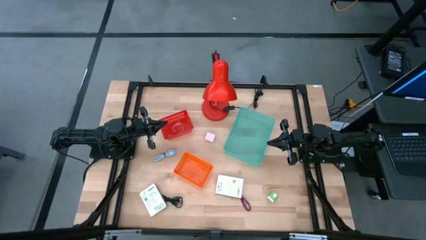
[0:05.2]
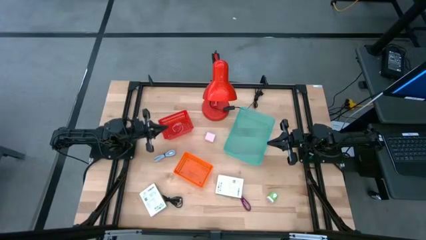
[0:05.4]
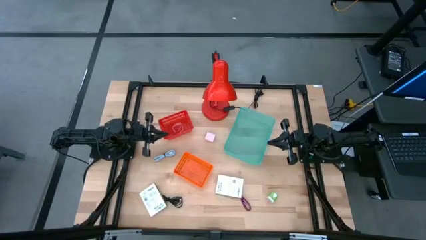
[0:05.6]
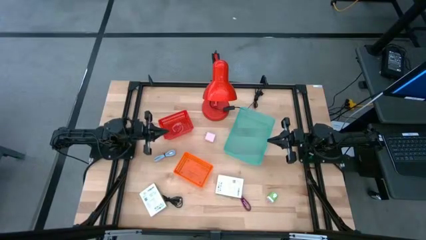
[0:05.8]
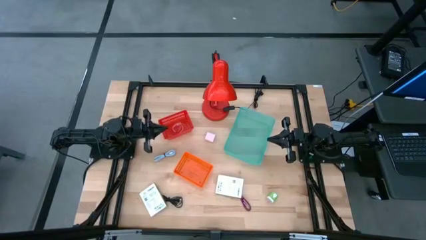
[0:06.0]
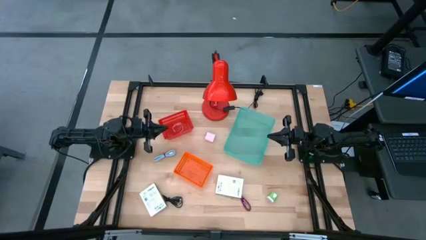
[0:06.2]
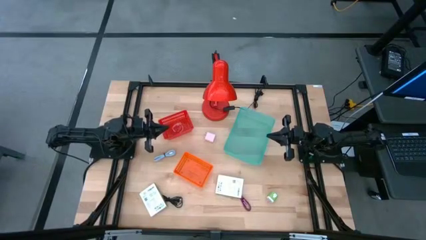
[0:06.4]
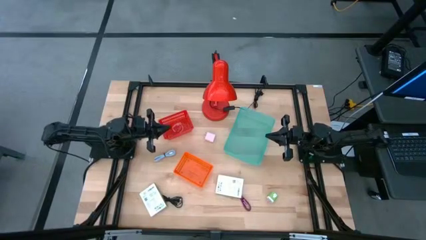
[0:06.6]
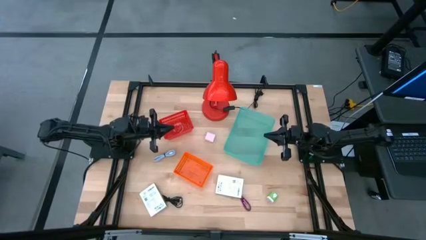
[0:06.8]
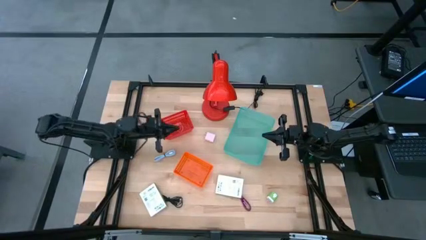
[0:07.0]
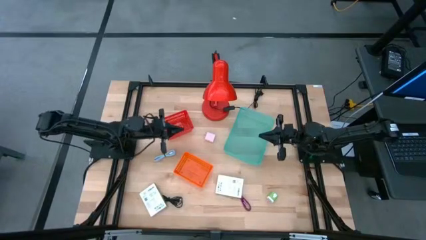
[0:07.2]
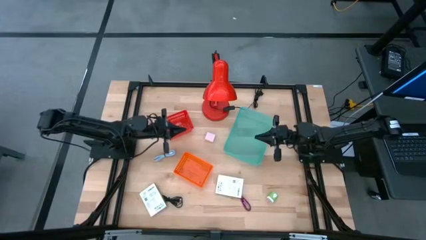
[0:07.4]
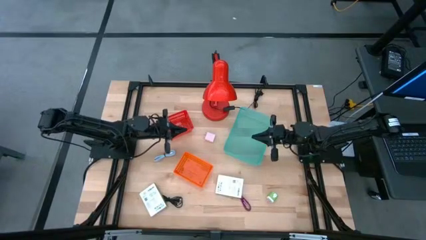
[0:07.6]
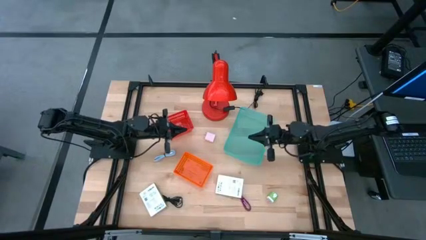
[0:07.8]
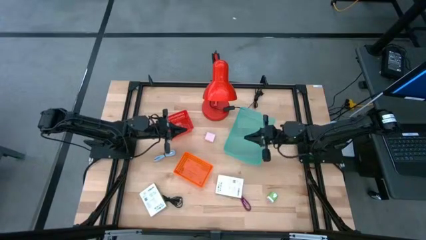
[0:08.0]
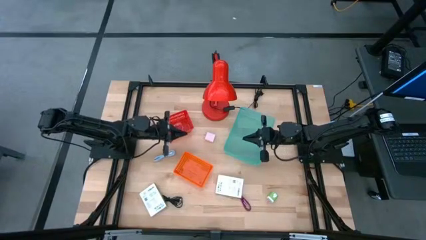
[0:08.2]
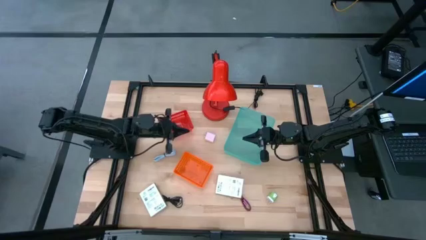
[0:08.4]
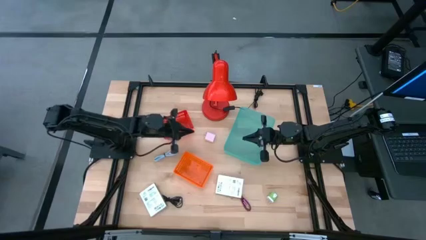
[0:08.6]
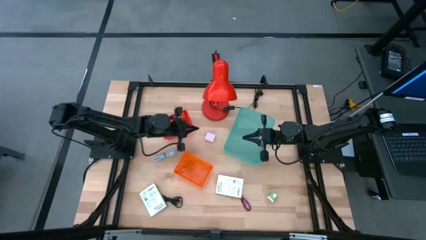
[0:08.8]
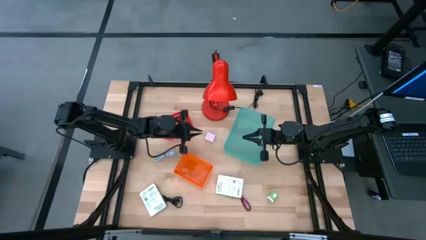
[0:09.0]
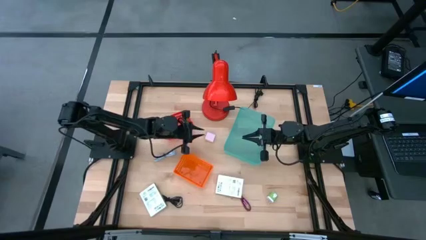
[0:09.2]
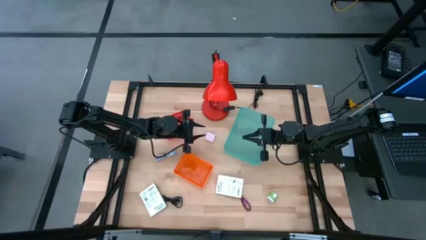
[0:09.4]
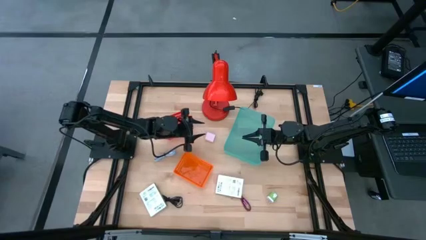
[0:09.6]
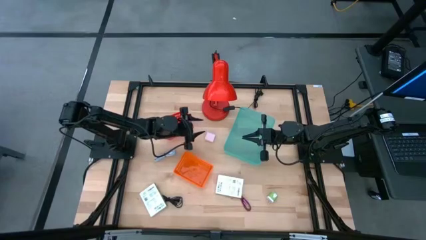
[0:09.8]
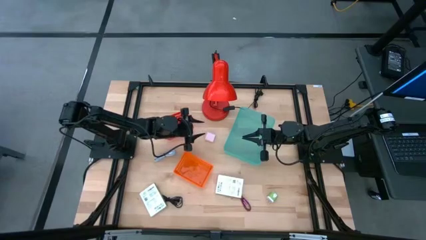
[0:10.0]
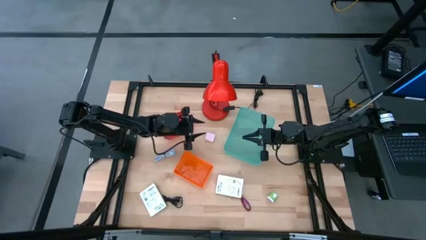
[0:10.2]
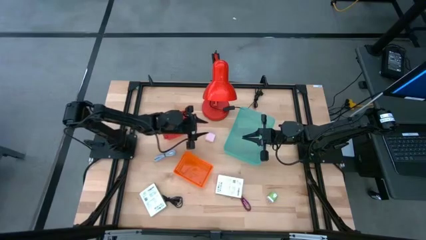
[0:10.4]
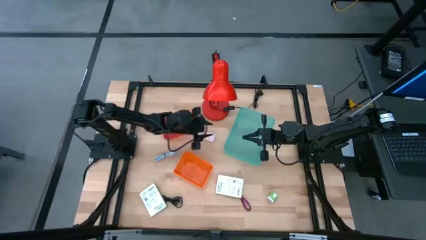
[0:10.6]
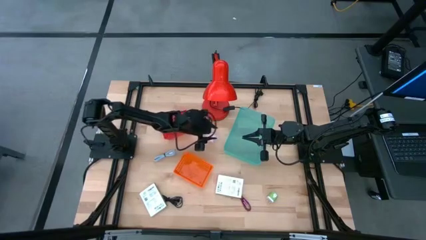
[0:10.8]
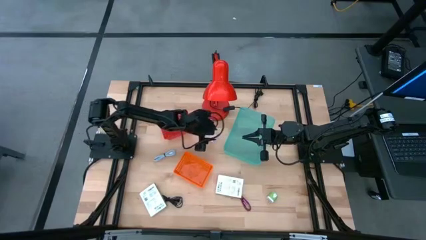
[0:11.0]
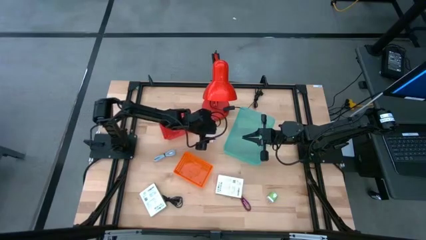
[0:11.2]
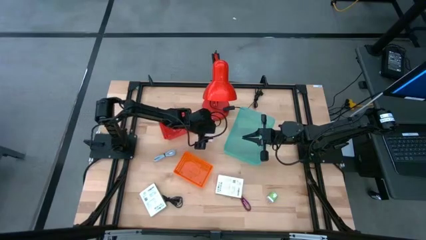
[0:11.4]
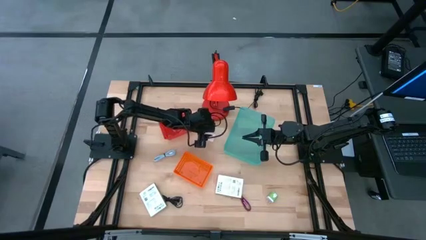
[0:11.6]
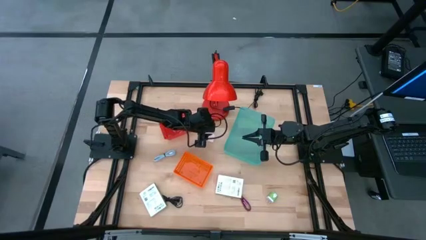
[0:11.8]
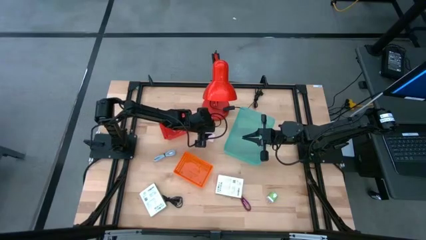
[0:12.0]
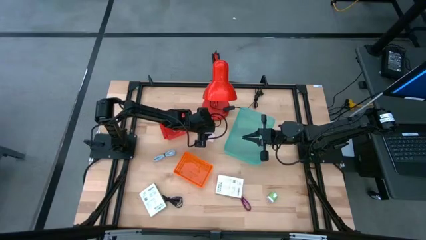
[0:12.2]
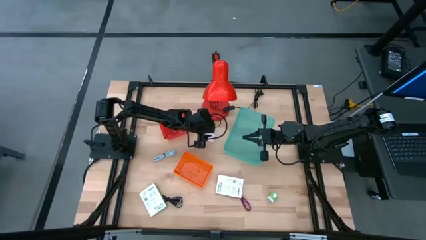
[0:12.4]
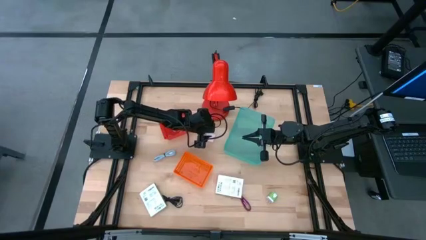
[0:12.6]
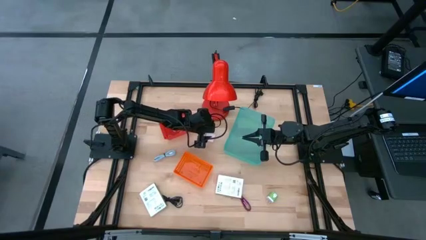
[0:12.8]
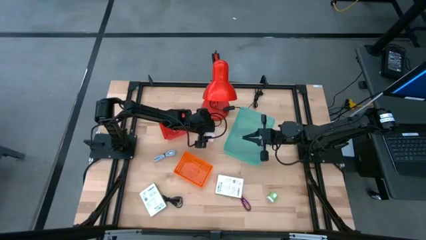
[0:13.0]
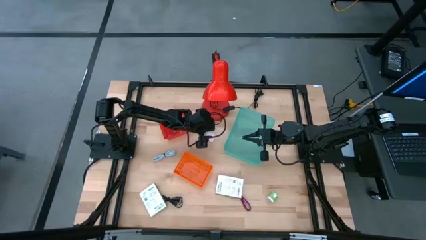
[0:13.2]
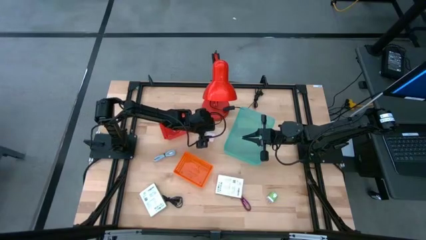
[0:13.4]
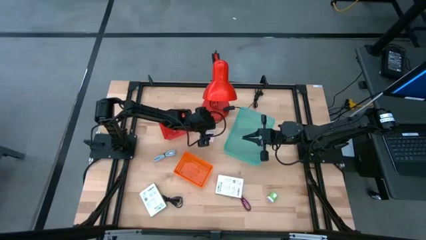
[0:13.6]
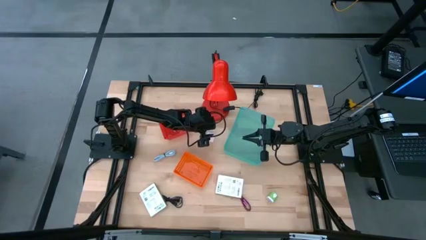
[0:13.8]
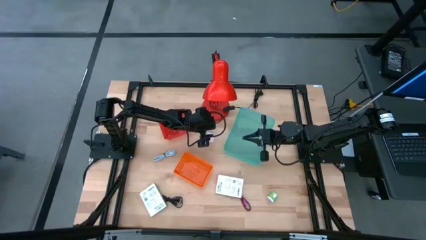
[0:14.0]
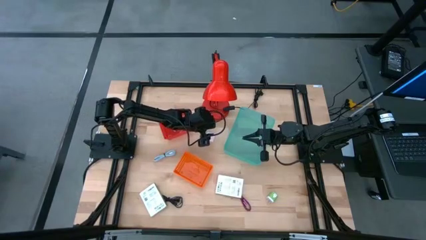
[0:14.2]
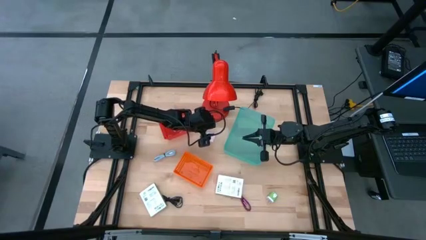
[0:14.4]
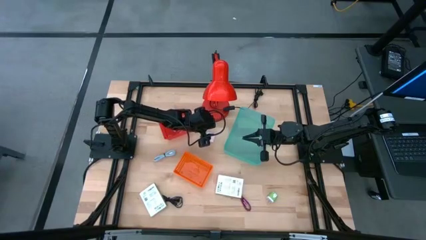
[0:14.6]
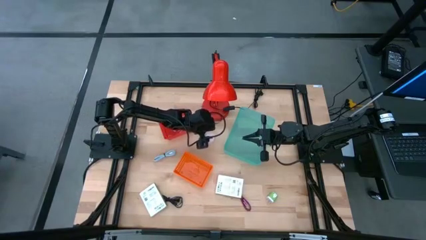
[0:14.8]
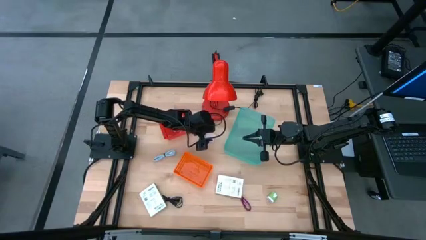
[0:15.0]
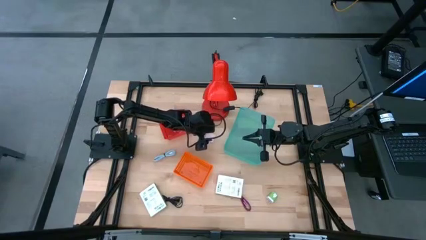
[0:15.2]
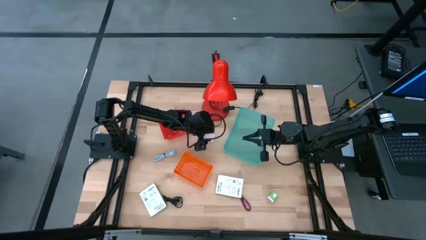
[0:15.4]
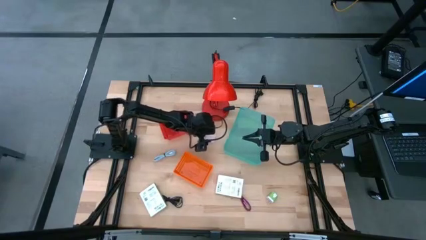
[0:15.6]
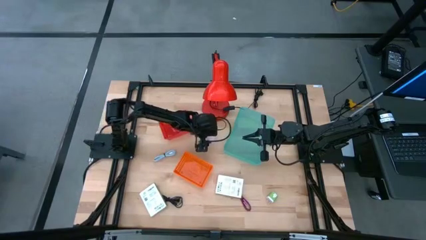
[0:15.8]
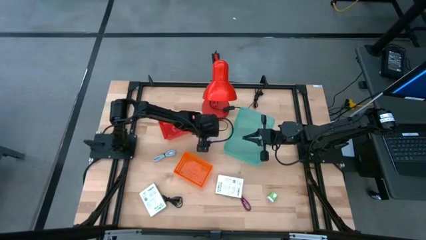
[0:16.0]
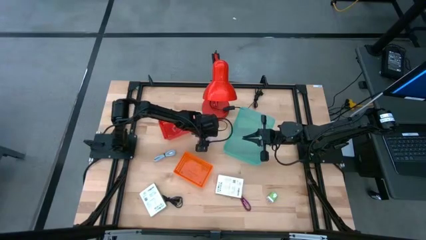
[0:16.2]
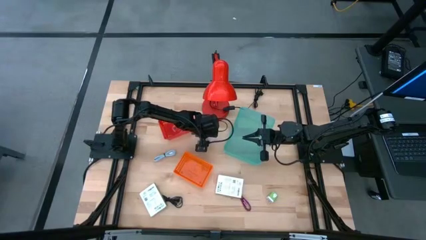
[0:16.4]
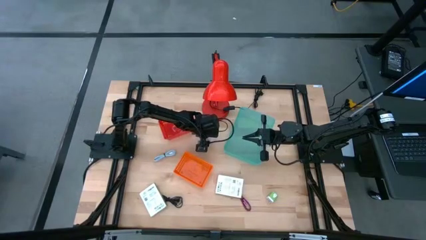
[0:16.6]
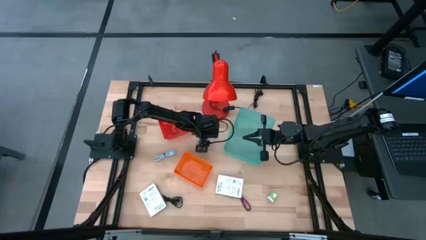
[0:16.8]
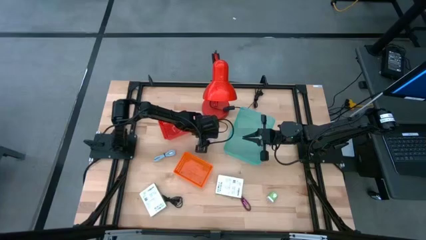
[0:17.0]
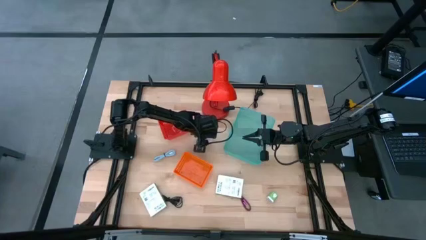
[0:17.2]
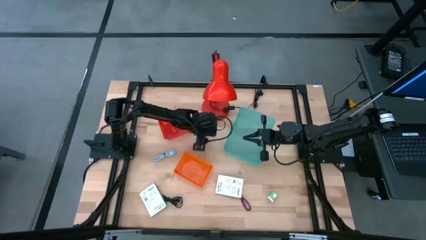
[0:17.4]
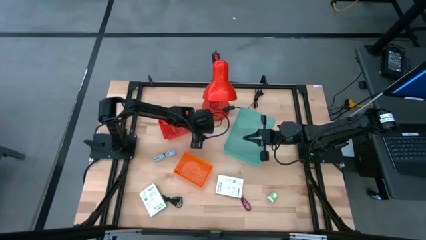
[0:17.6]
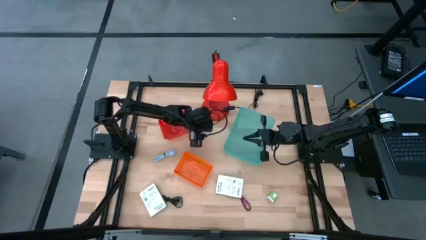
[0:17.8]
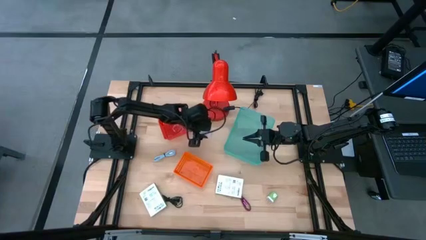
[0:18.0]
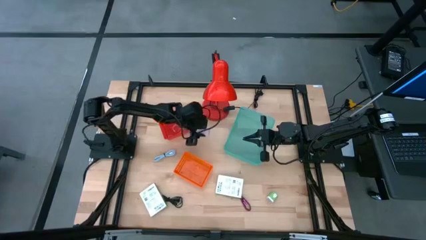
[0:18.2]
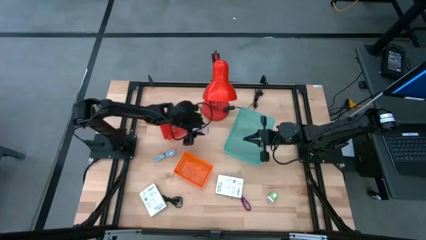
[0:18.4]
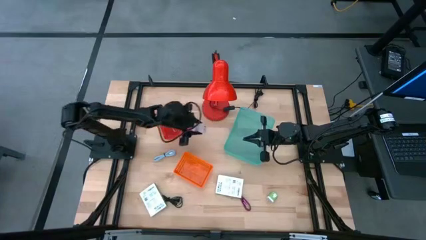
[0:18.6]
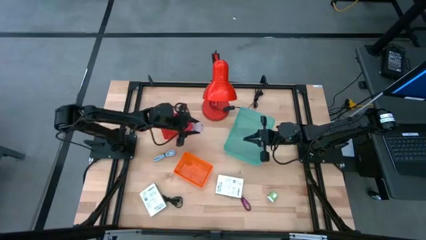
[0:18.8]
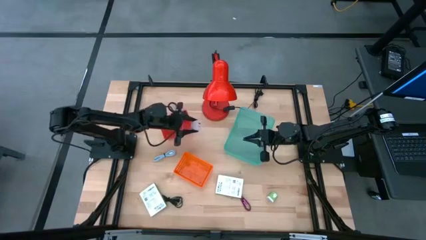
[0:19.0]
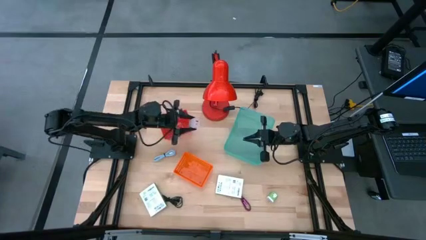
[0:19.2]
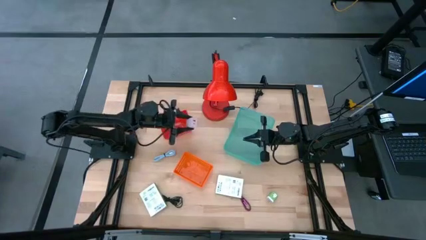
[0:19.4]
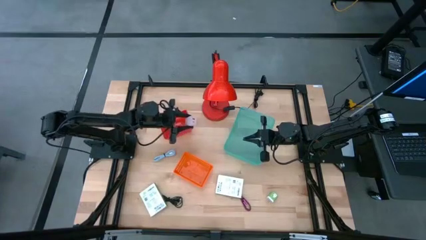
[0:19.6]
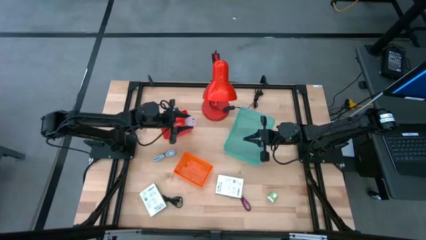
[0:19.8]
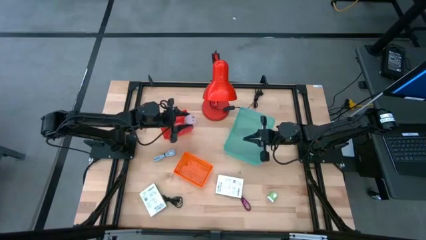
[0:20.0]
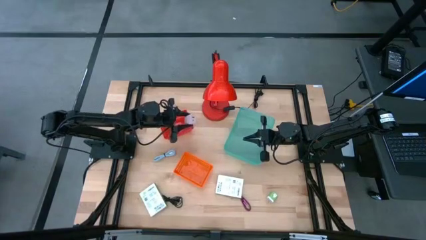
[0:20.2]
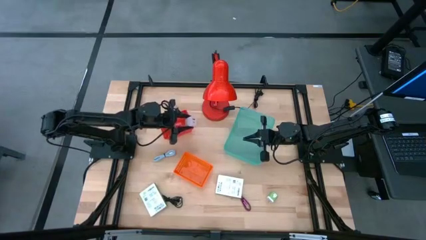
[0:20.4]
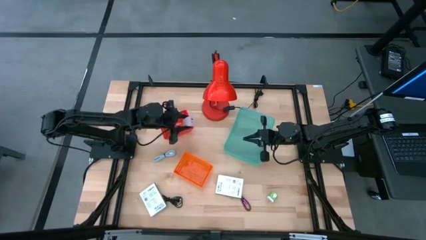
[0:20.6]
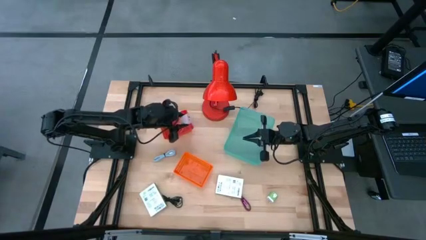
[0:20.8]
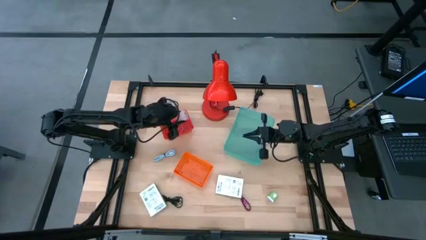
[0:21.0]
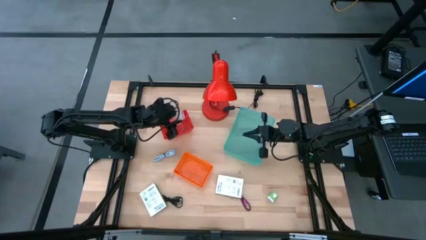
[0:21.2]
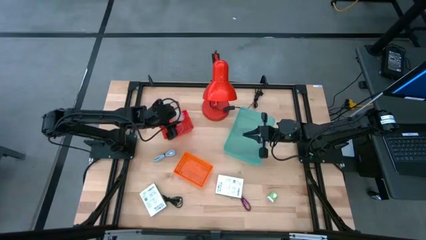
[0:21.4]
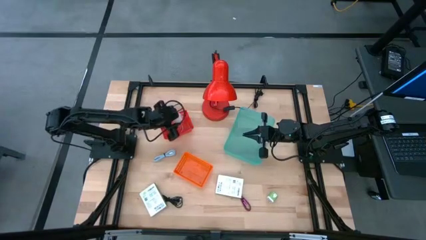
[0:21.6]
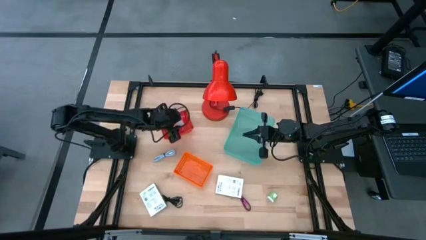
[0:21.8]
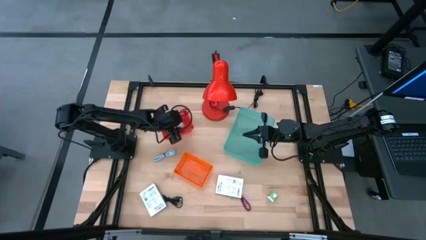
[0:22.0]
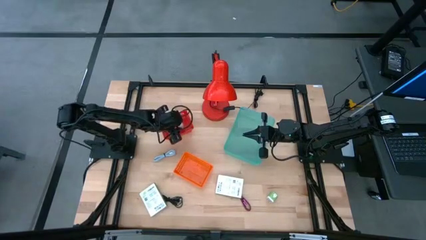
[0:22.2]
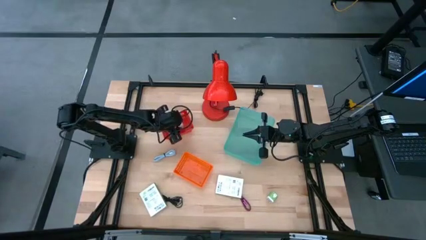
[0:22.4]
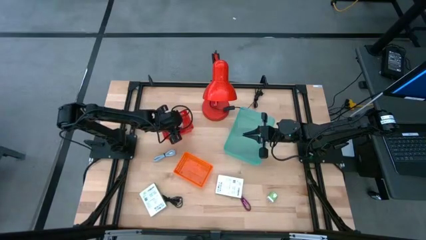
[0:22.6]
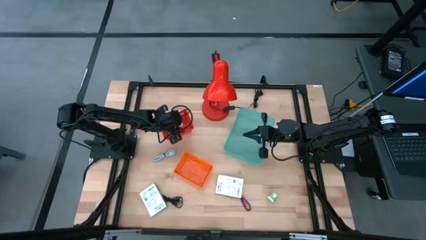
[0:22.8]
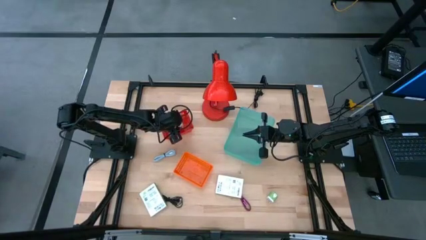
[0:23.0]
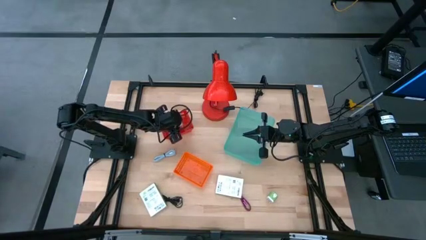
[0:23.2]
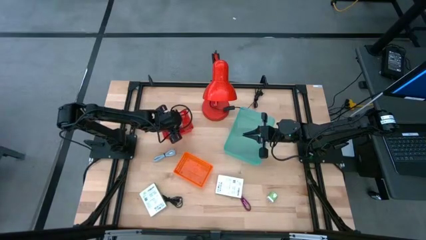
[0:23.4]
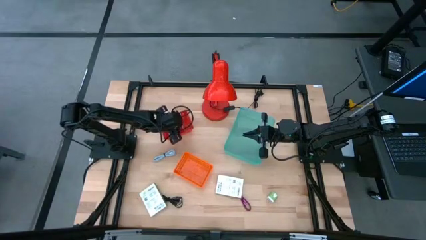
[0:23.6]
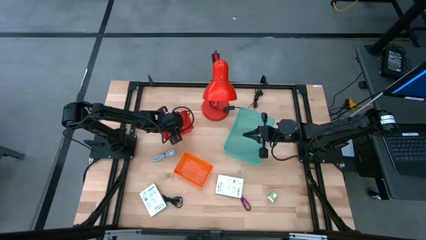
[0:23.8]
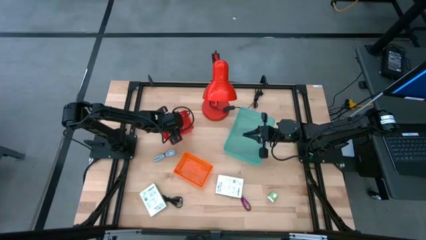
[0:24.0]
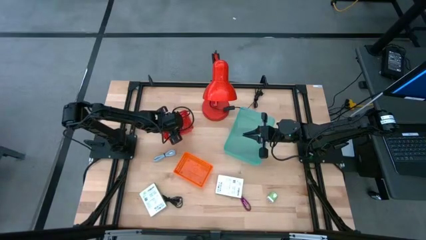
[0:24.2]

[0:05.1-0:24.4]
Task: Pick and place items into bin
Put the white charger adapter into the red bin
